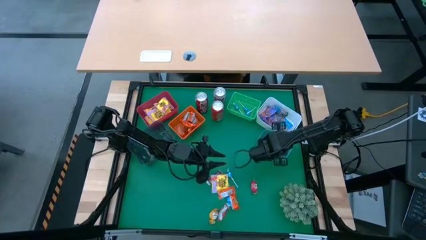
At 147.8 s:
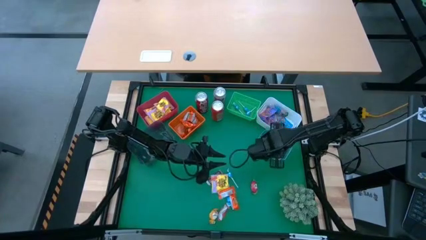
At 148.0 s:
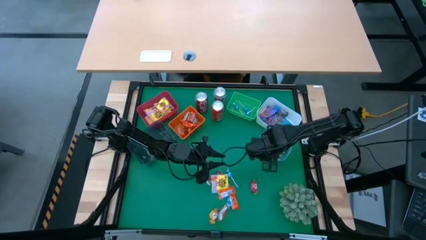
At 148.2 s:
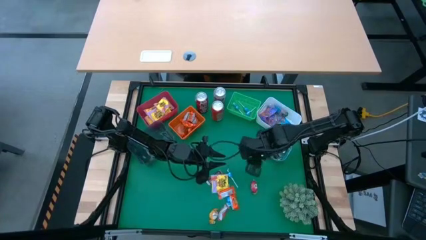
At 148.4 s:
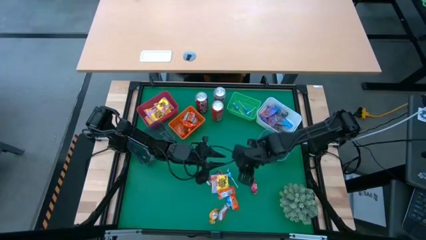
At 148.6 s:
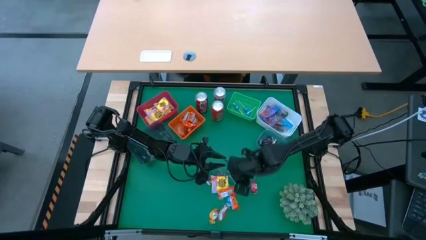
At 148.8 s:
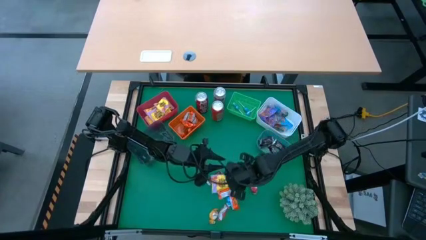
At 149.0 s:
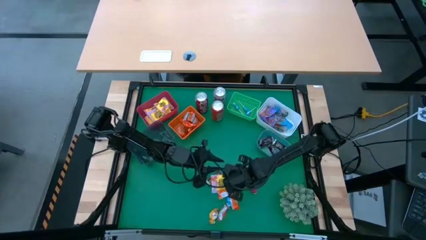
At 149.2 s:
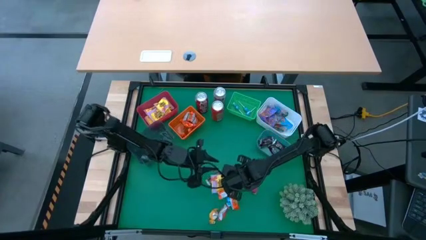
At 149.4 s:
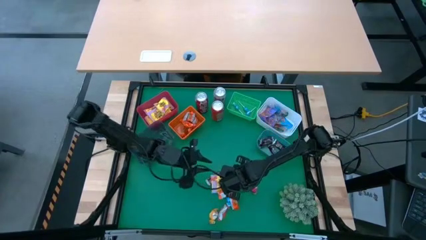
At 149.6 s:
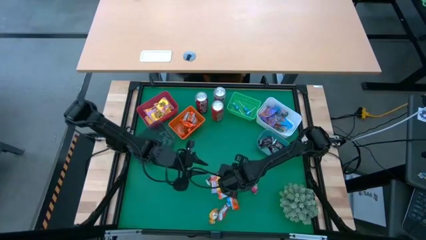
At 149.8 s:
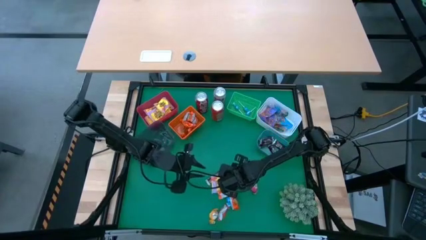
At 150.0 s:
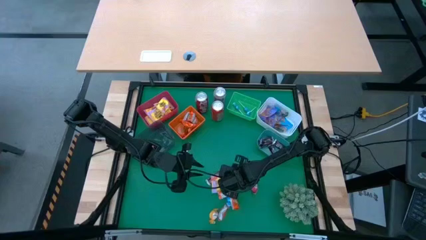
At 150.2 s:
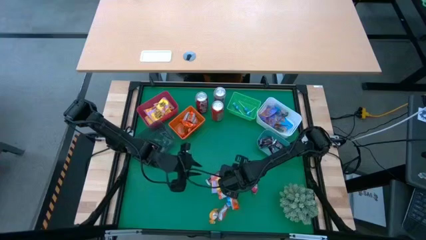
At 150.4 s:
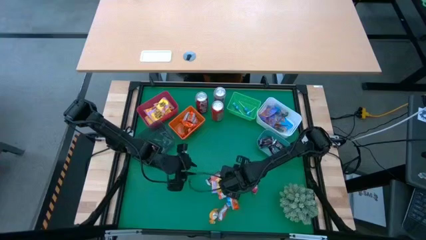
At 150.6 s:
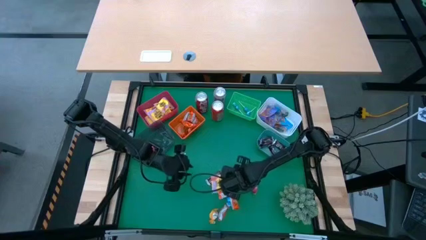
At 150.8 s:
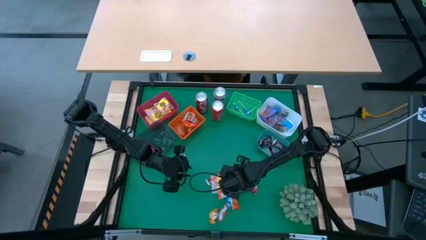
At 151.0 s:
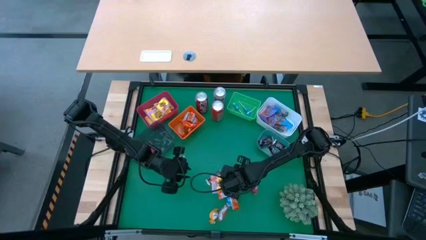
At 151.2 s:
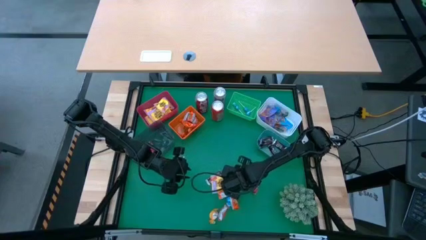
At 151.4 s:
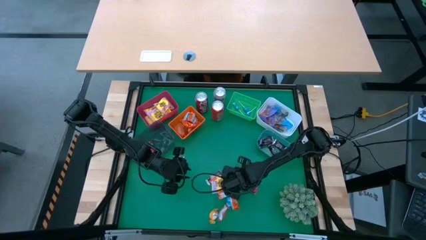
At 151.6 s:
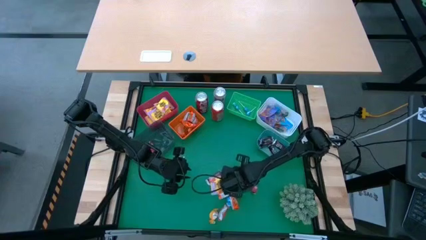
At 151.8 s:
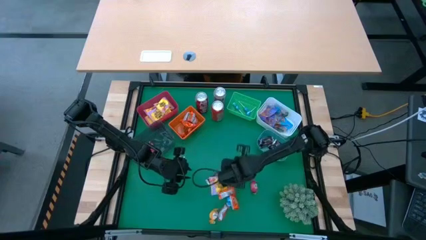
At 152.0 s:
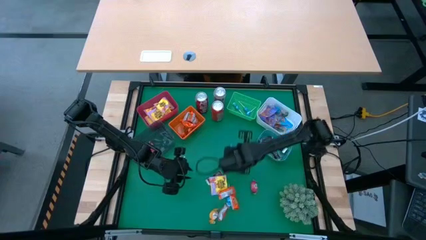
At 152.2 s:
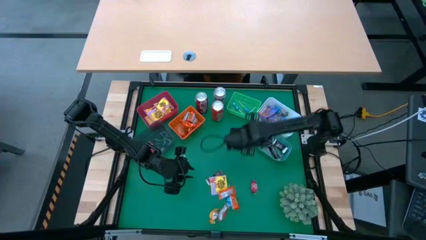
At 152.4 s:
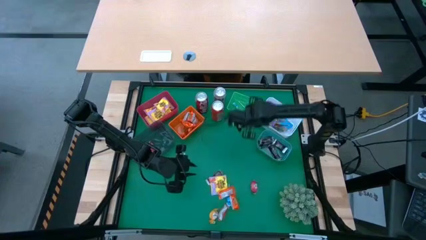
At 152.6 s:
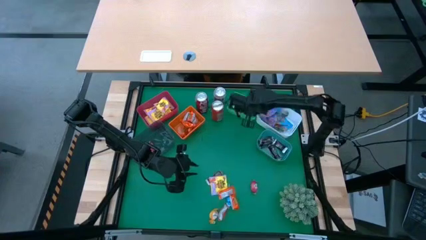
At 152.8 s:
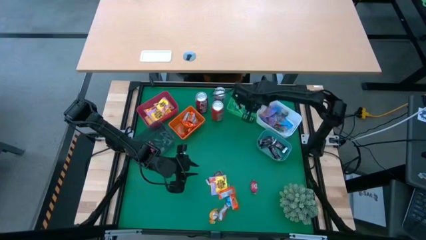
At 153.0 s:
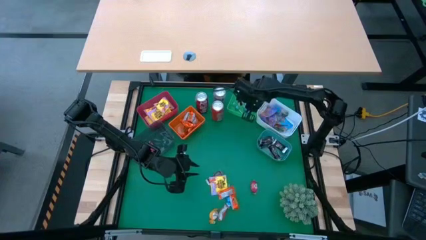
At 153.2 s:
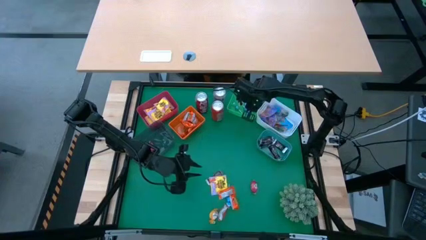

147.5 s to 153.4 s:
Task: Sort candy
Put the blue candy into the green bin

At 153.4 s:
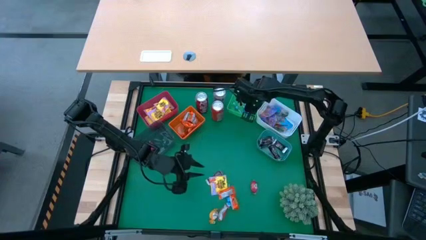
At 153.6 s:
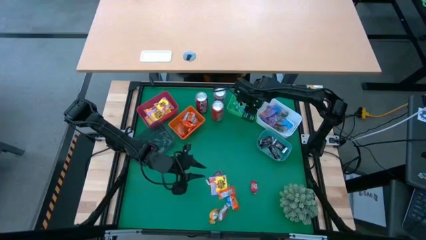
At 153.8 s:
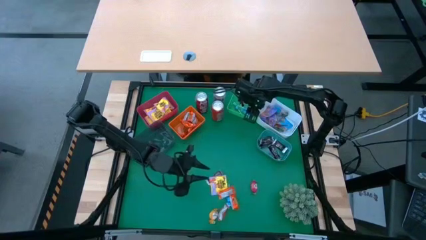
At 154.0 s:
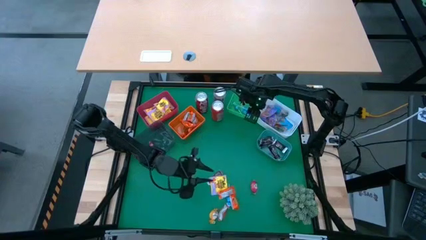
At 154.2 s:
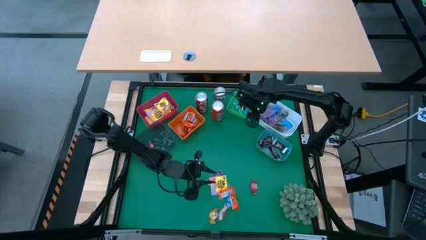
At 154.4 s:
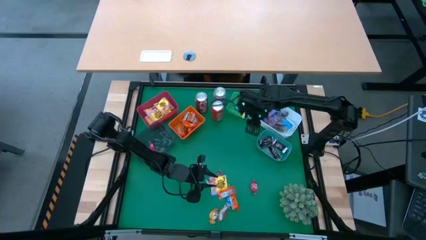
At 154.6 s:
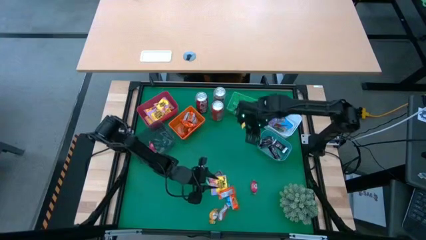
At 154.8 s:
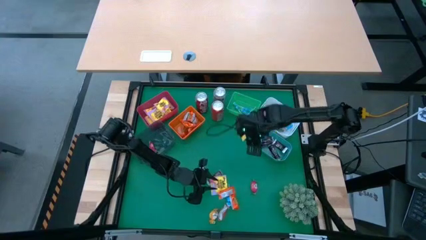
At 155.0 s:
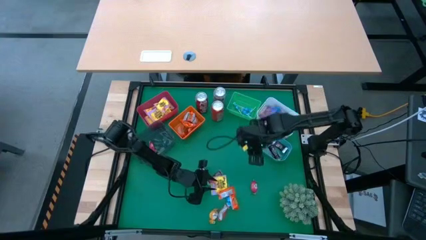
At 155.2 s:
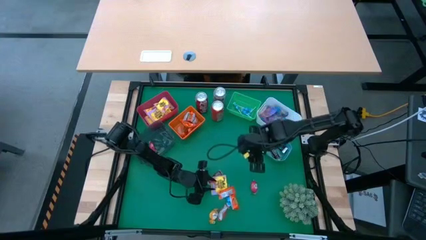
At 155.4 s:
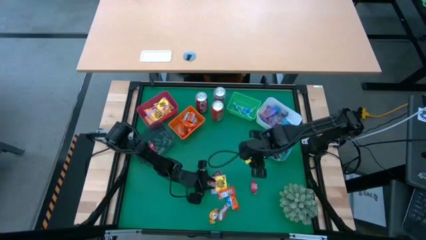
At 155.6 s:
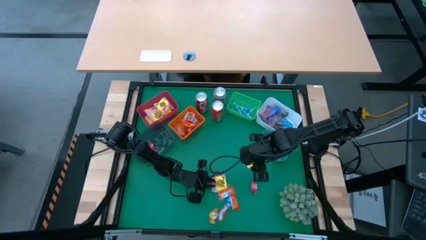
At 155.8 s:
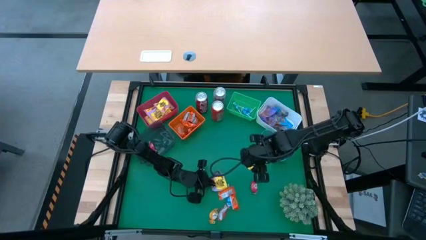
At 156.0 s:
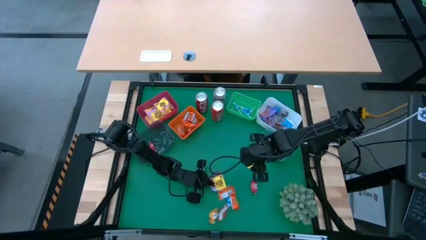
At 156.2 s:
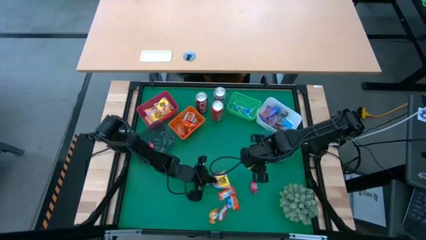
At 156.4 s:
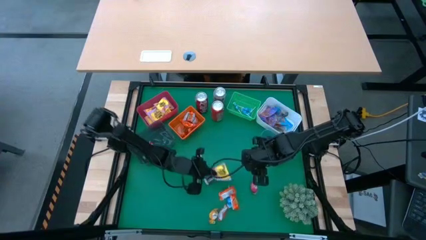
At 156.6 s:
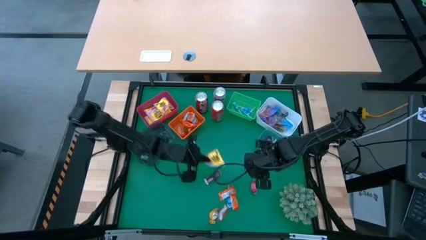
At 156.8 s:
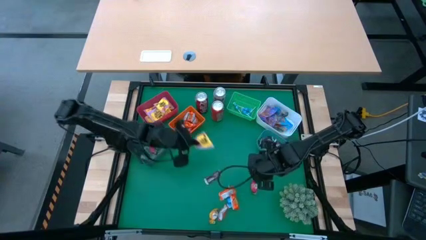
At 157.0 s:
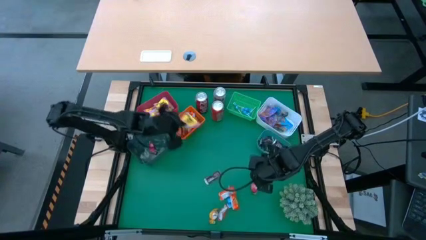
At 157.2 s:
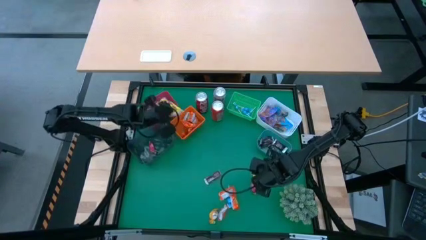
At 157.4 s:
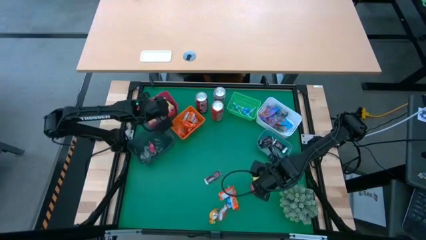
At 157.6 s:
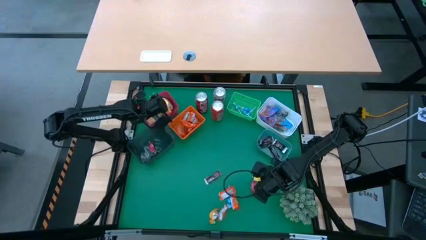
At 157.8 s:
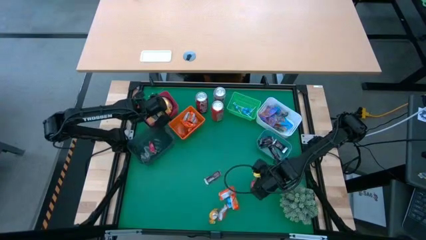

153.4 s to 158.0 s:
Put the yellow candy into the red bin

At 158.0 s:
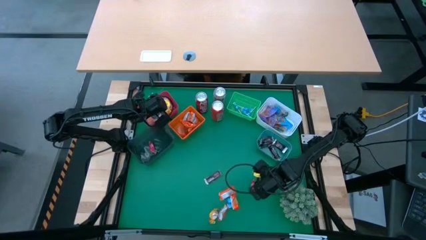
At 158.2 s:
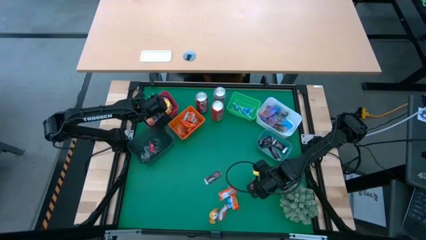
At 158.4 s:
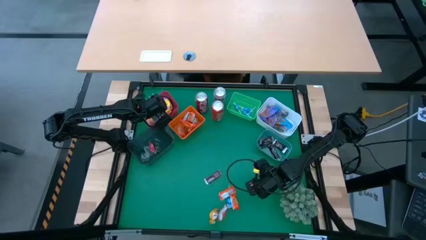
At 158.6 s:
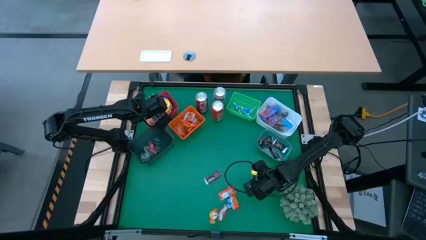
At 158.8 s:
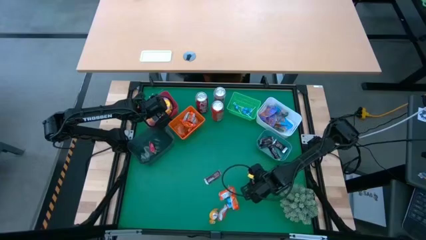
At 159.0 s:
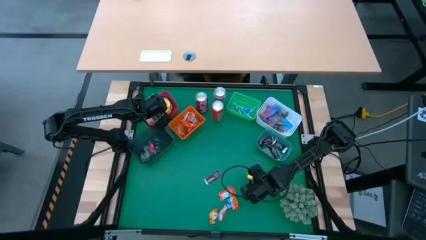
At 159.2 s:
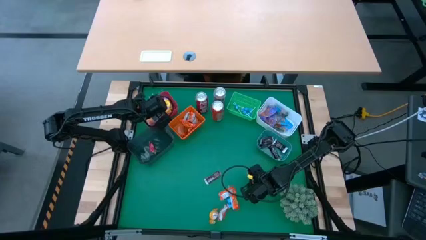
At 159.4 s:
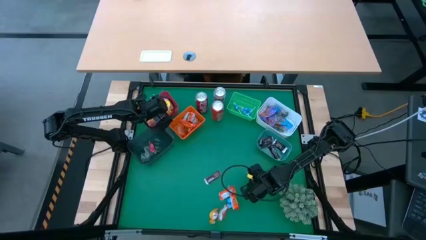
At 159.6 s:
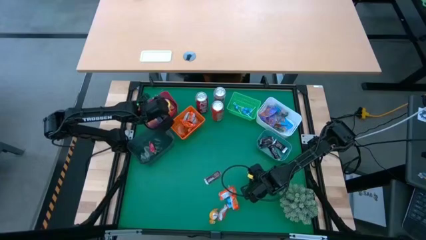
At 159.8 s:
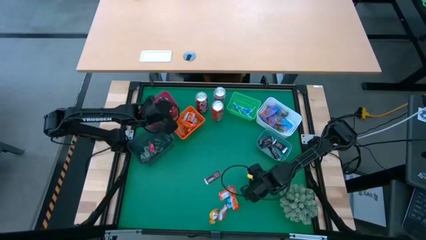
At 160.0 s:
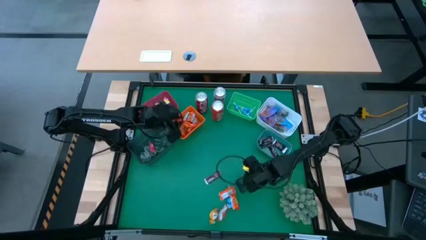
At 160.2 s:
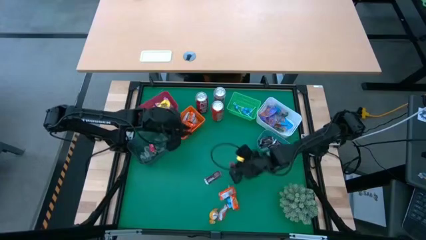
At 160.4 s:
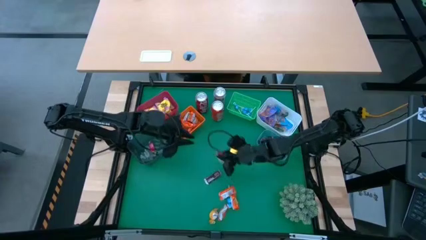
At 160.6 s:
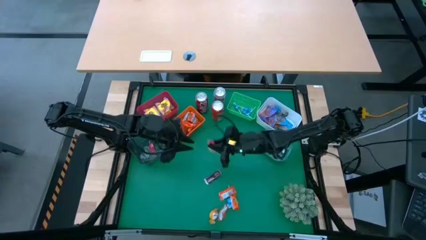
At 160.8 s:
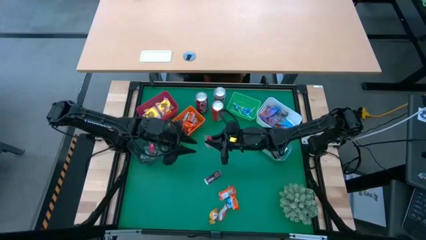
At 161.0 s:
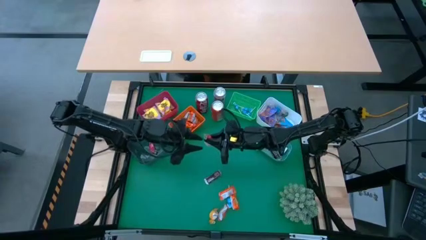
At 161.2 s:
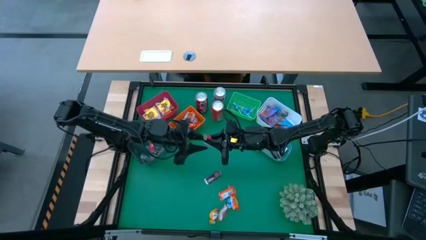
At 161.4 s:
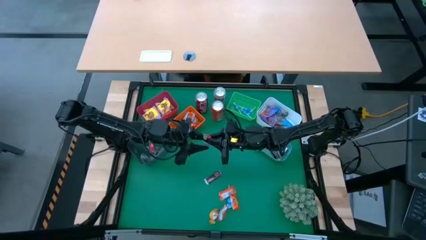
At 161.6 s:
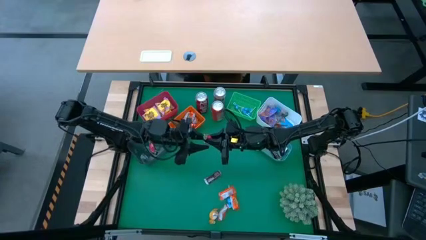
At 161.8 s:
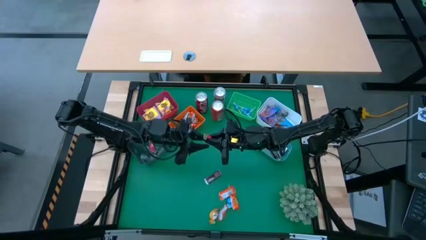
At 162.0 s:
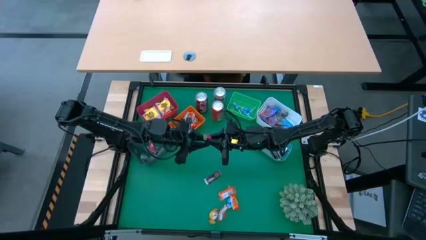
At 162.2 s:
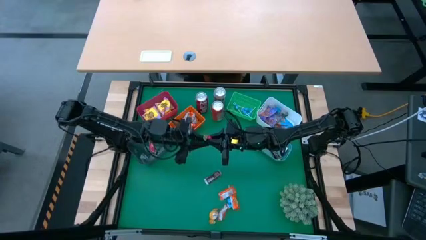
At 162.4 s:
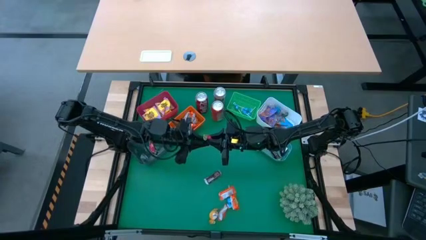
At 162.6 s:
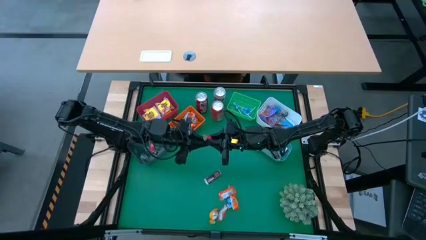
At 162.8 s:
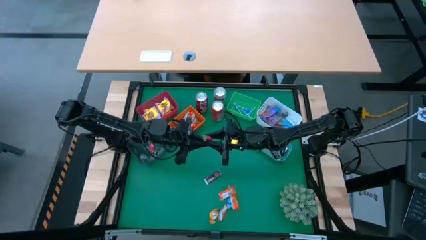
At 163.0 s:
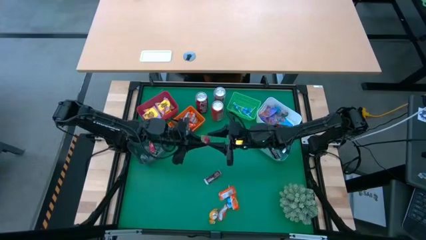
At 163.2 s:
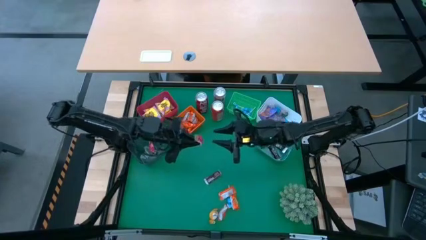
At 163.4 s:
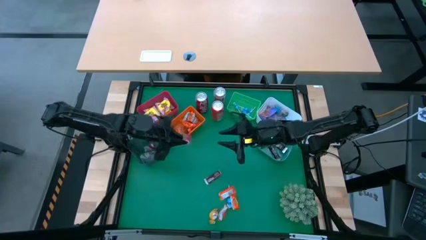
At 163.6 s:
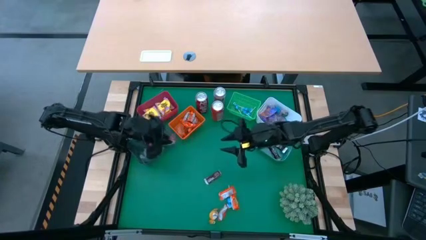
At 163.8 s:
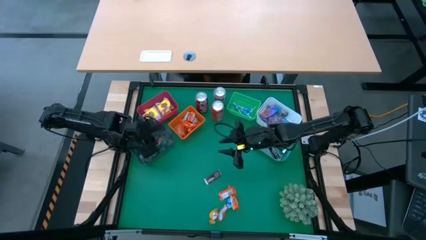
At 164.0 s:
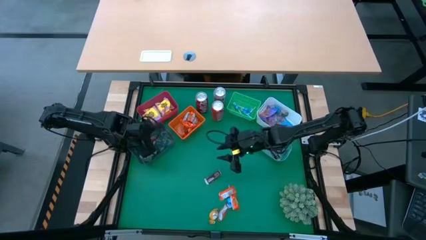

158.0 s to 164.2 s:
Put the red candy into the black bin
